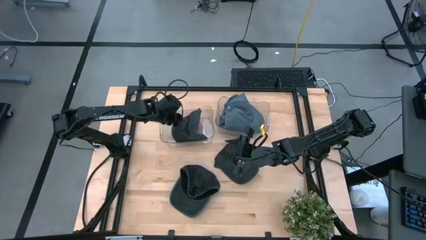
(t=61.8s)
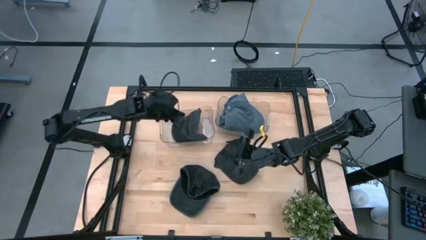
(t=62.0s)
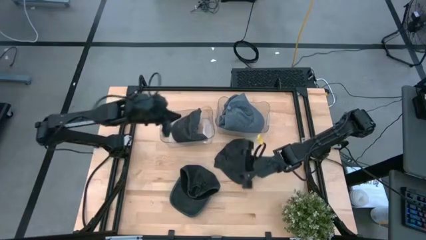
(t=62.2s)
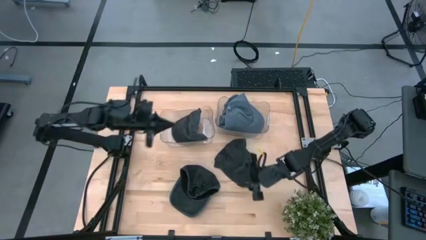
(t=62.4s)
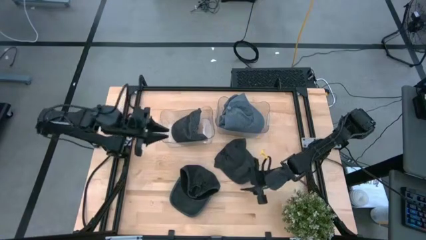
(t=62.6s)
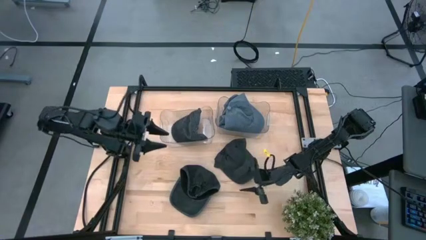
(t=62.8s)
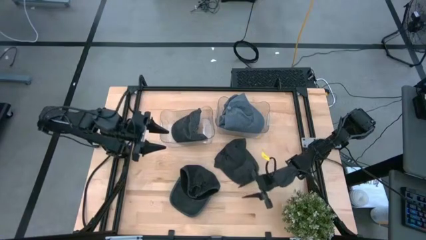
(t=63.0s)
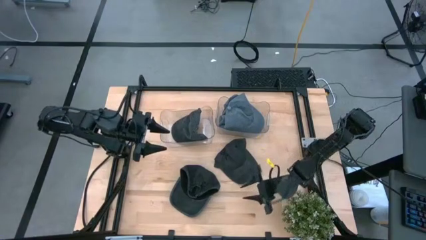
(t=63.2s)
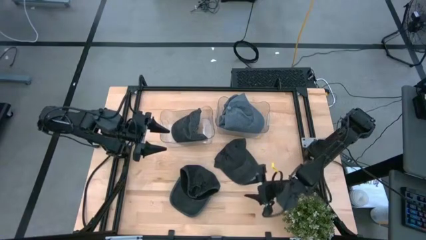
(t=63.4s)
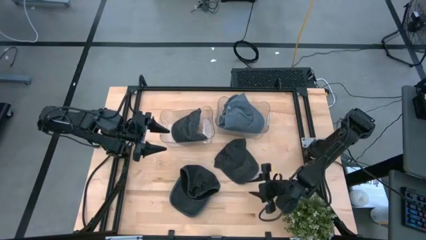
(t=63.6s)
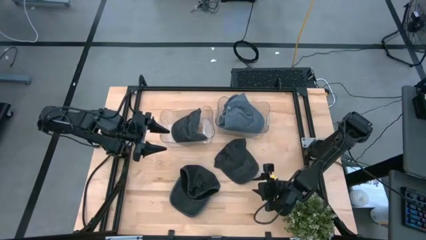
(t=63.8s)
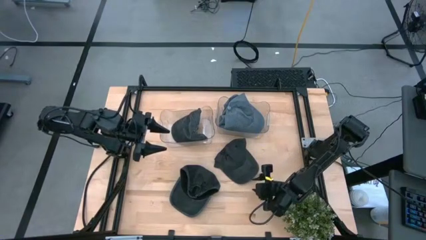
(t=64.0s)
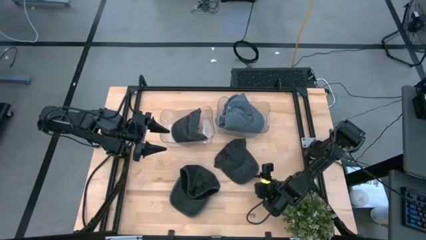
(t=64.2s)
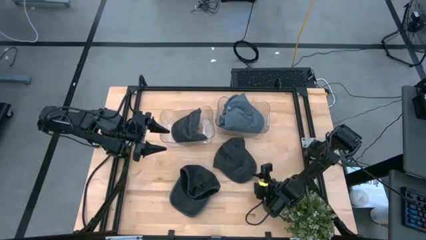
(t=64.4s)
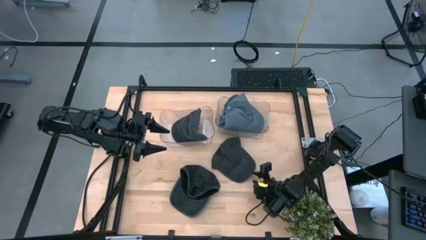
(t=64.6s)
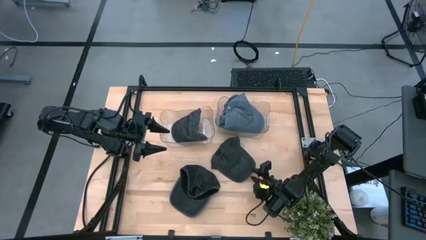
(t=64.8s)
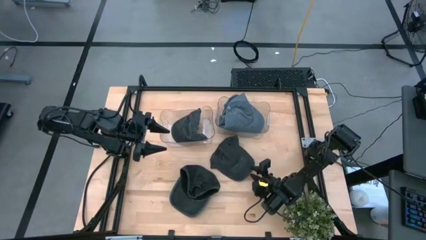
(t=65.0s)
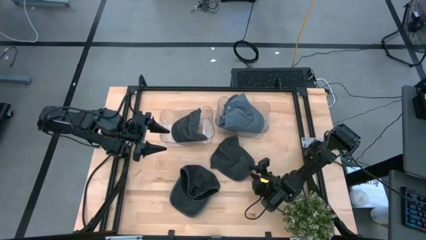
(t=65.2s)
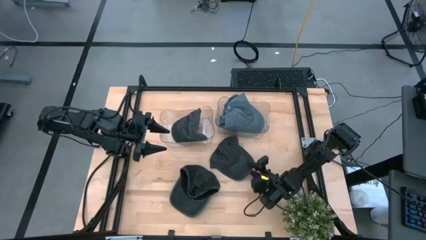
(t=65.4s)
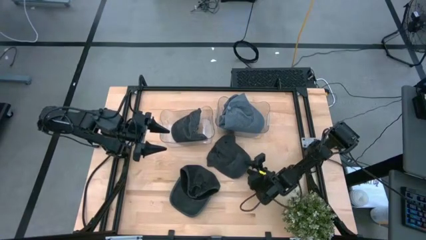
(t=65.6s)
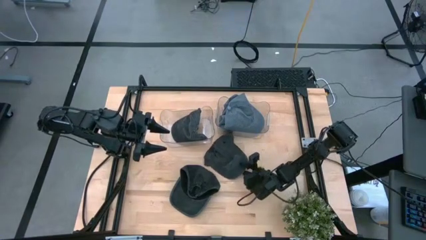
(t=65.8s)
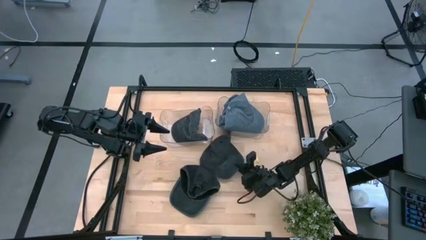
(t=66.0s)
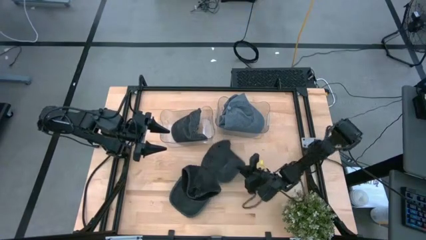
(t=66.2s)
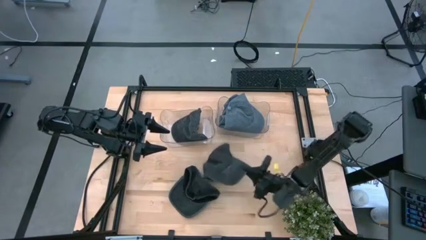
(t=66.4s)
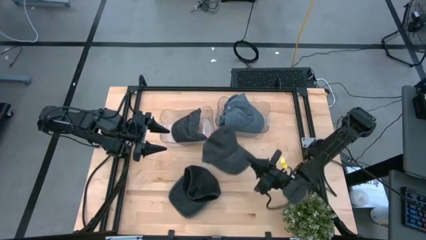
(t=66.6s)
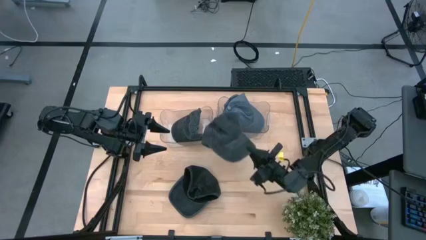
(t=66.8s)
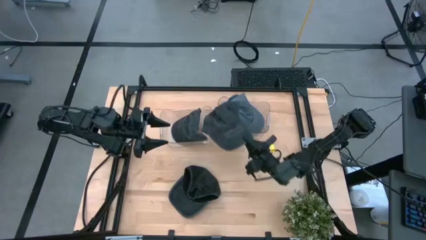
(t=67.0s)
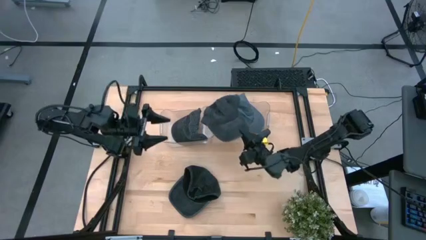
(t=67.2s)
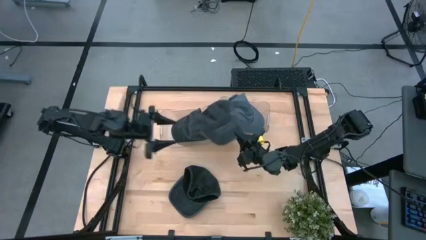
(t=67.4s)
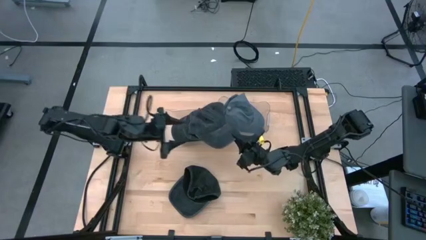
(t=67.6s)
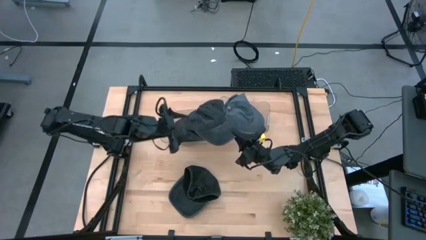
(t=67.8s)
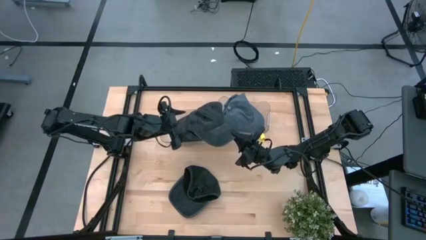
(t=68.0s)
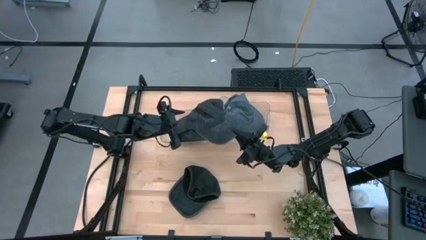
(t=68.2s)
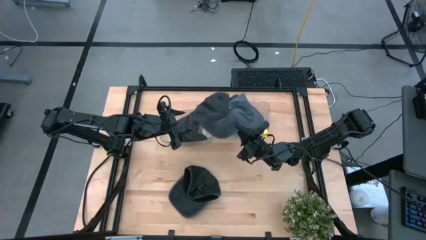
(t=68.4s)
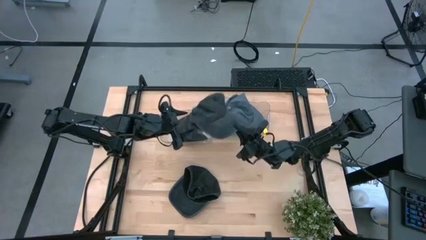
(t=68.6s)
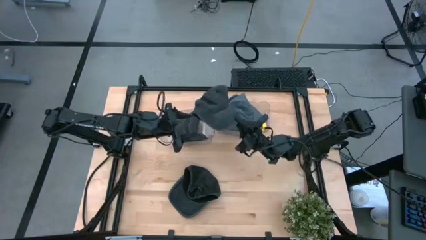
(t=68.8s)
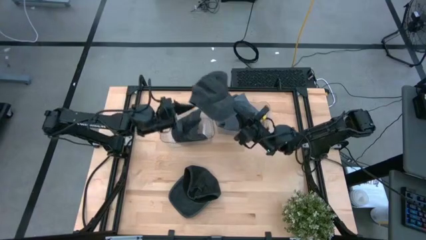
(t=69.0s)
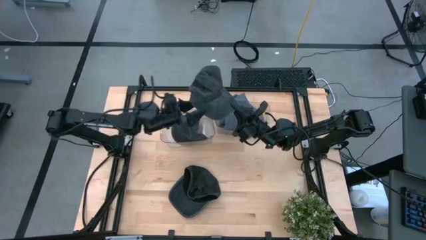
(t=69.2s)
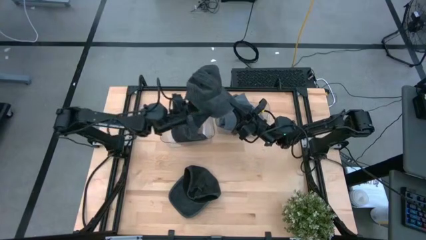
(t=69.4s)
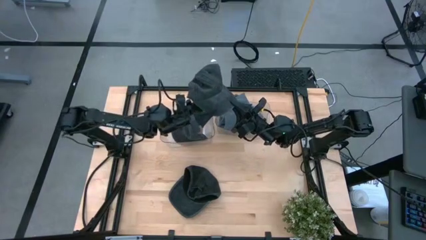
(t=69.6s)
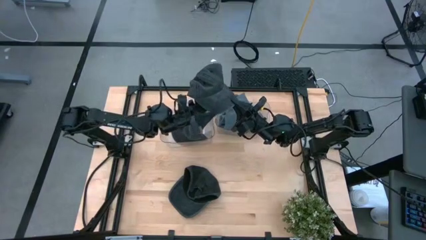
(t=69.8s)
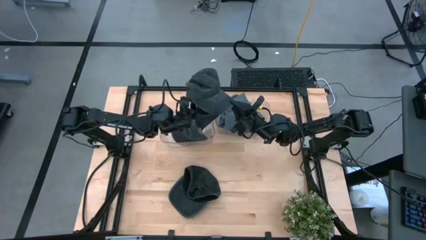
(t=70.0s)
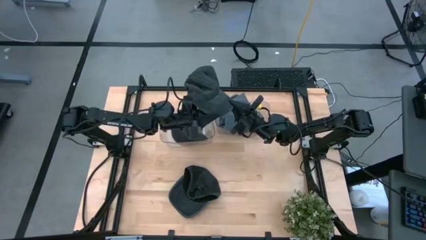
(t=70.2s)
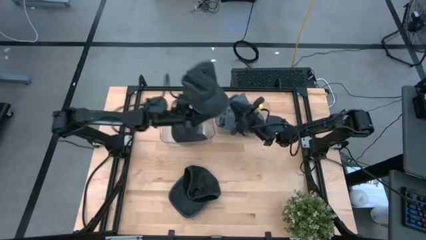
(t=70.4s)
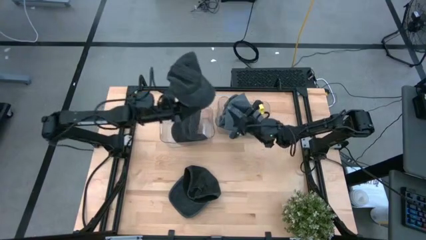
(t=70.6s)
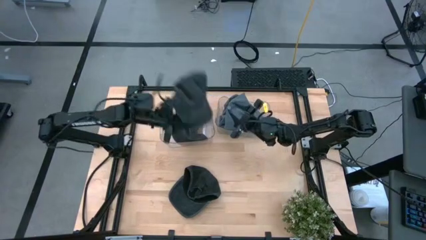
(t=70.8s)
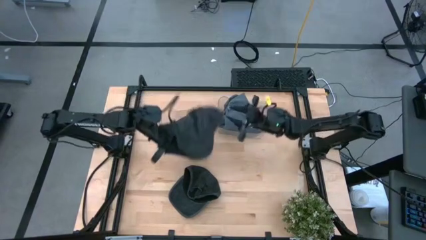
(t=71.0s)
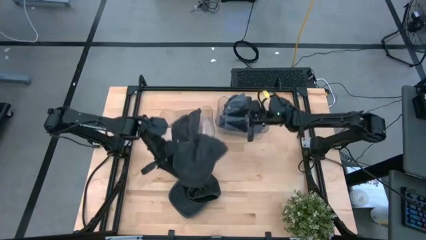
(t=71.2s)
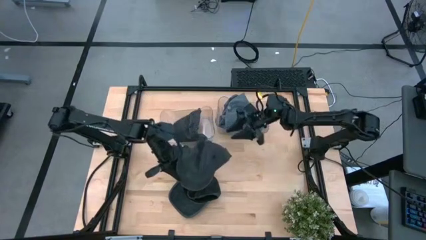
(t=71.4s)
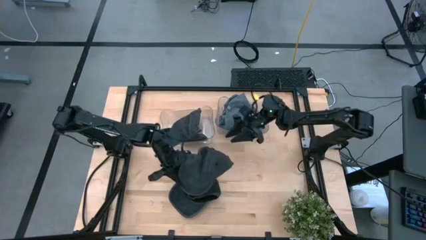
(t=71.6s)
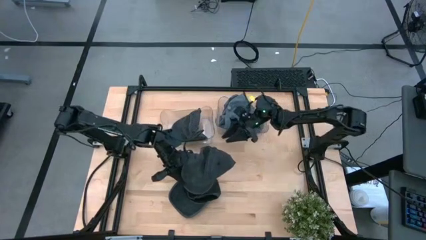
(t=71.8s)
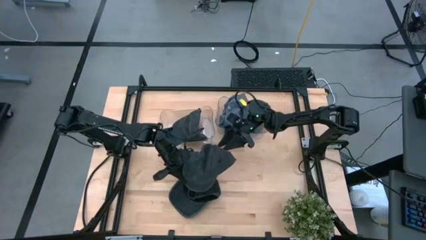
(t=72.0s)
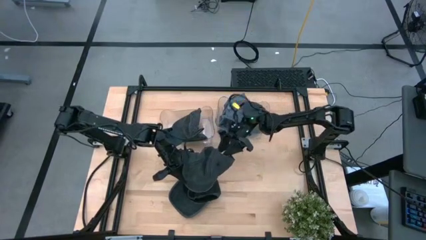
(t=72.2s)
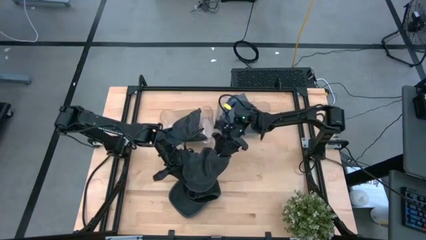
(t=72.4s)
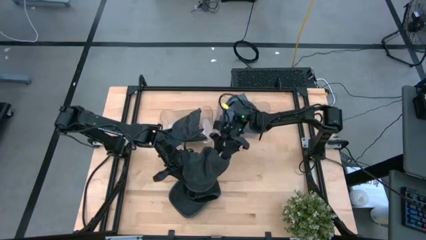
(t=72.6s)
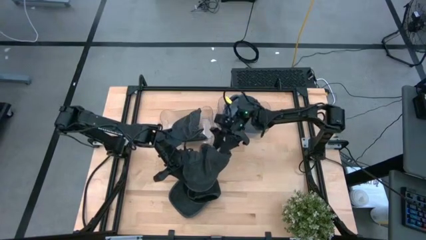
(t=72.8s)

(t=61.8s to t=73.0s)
Task: Pick & Place hat
Put the top black cap into the left transparent bin

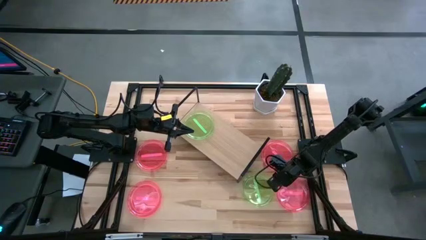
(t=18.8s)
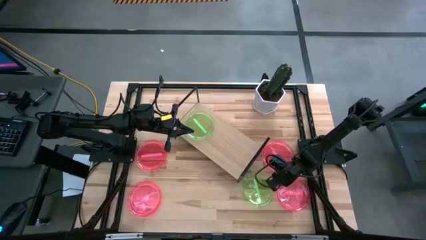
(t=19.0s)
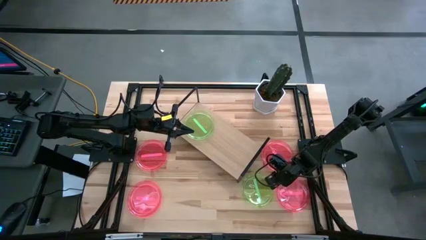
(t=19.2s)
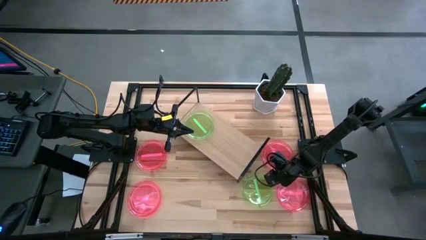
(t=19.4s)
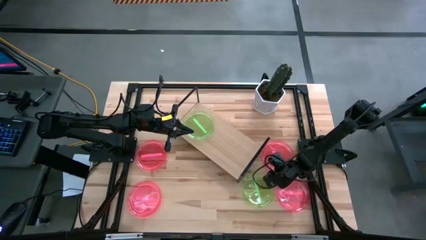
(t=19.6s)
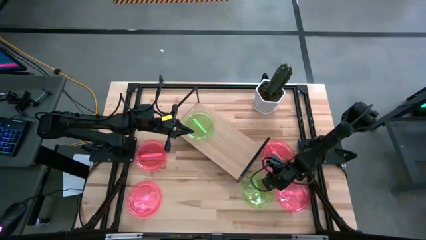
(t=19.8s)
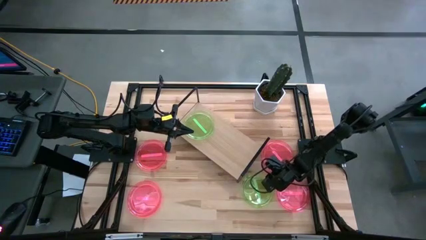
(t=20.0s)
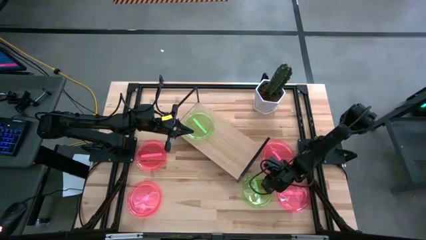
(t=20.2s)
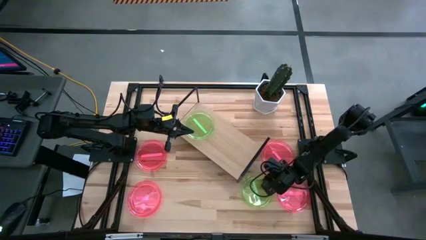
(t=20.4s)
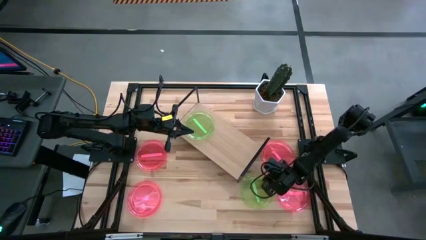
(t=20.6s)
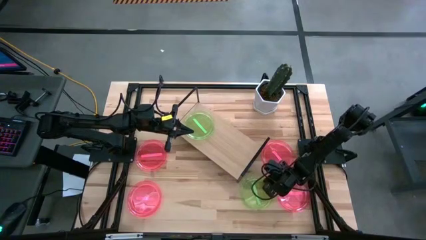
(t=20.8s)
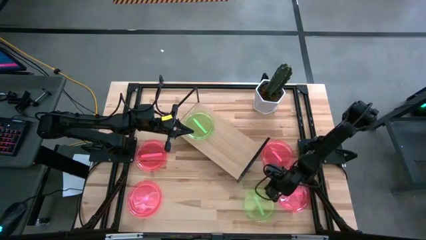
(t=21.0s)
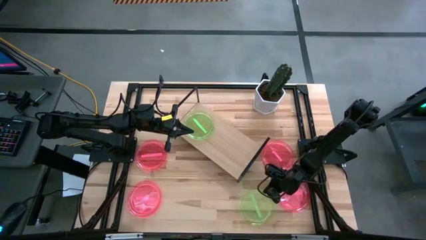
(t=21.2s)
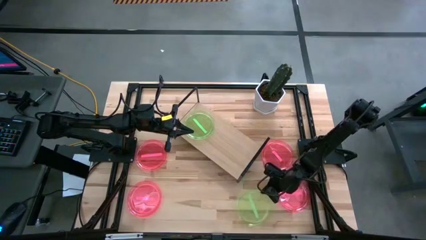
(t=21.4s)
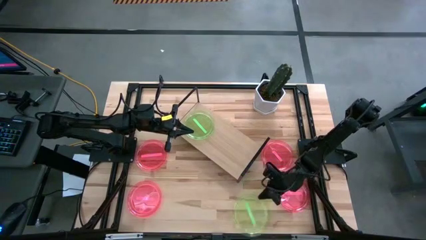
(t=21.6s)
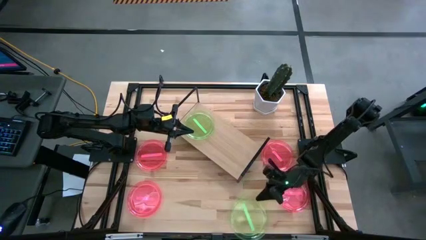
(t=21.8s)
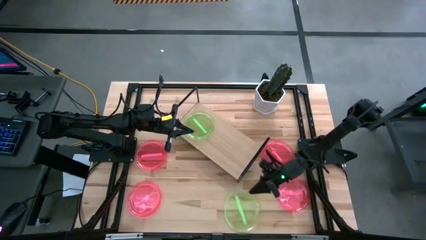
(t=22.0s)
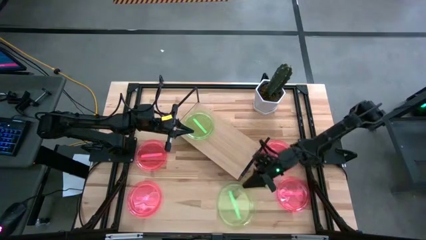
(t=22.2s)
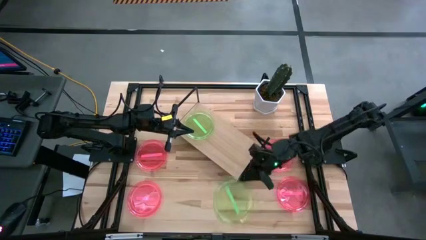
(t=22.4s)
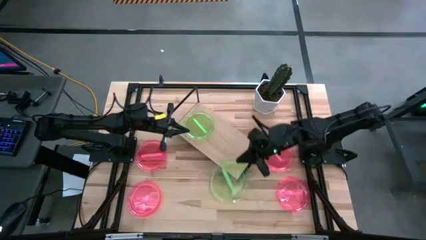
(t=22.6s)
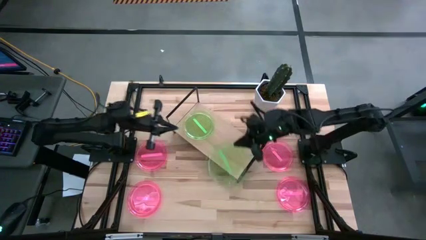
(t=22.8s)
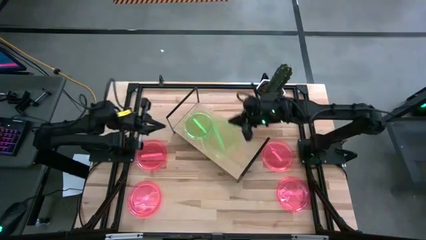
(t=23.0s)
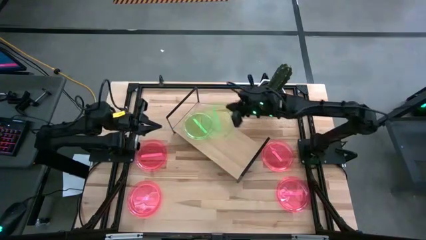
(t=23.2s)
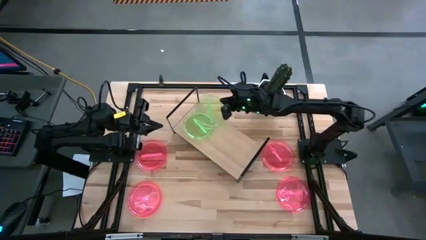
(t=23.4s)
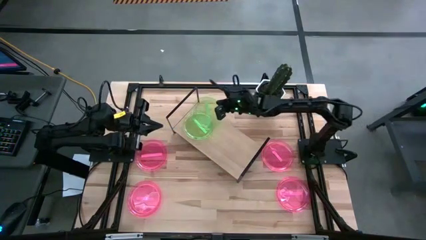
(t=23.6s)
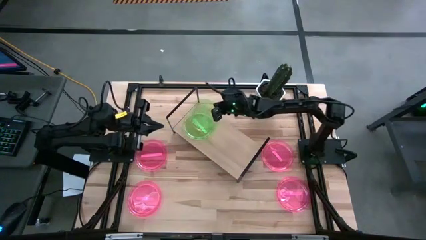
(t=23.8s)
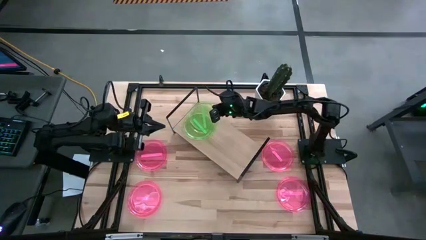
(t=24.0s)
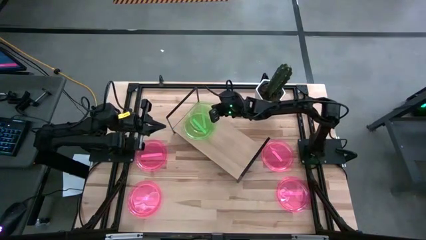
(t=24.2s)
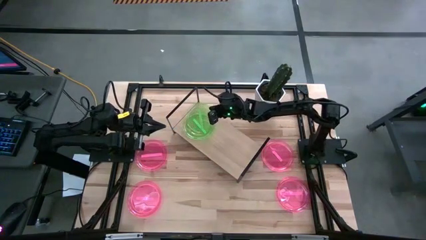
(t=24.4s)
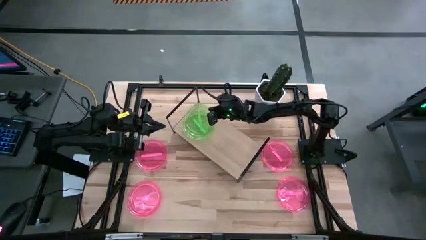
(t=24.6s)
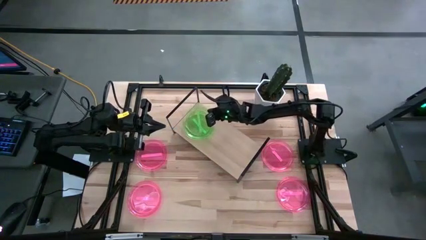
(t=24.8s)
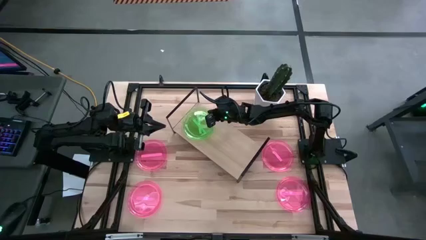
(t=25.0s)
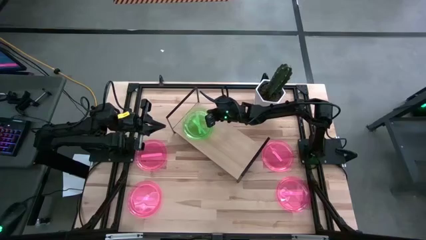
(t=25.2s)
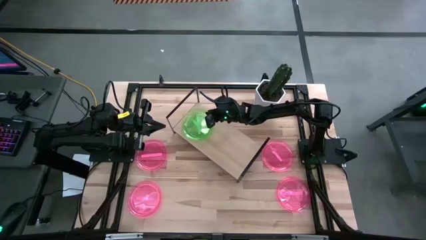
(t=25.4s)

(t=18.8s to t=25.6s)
Task: Place and stack plates onto a shelf
Stack the green plate on top of the other green plate on the shelf
